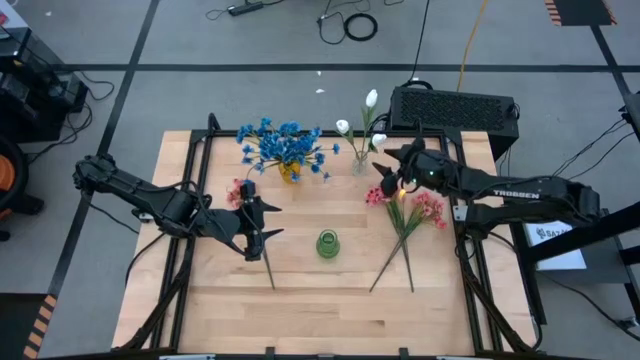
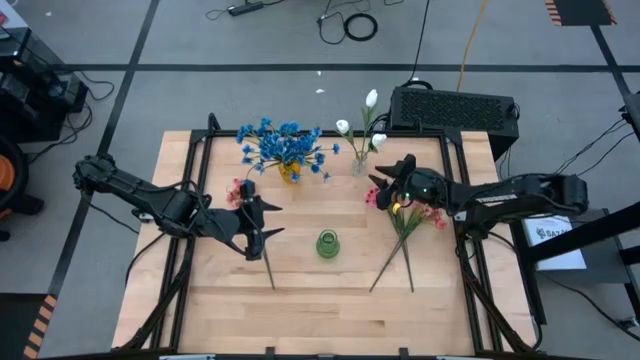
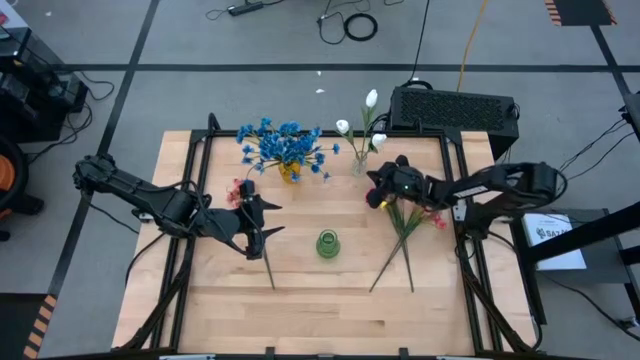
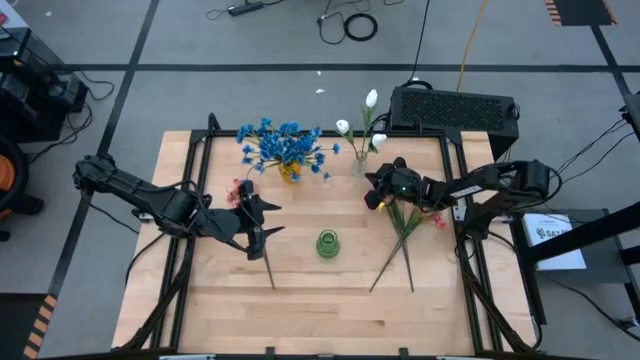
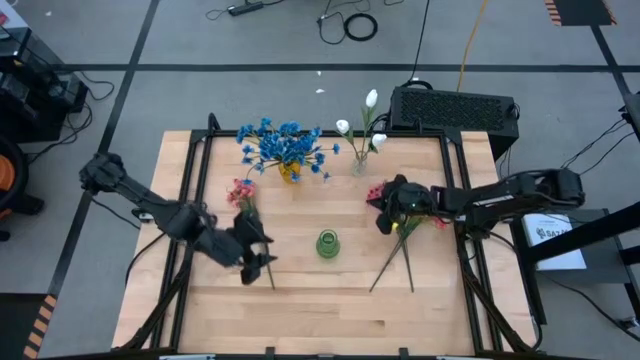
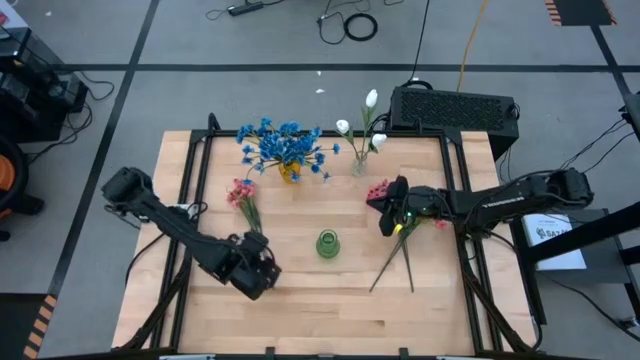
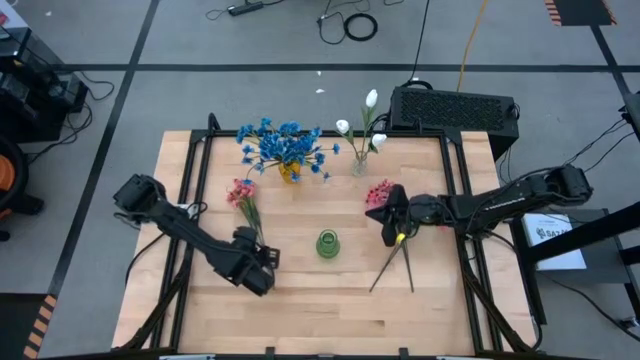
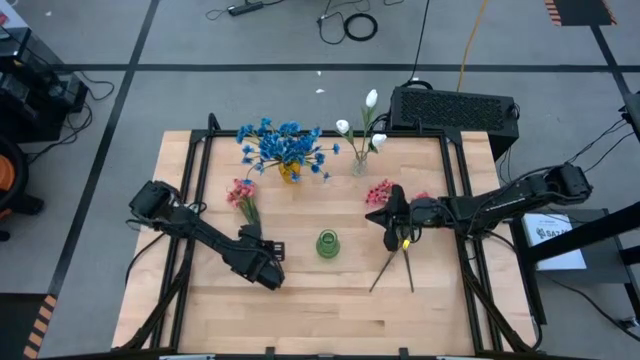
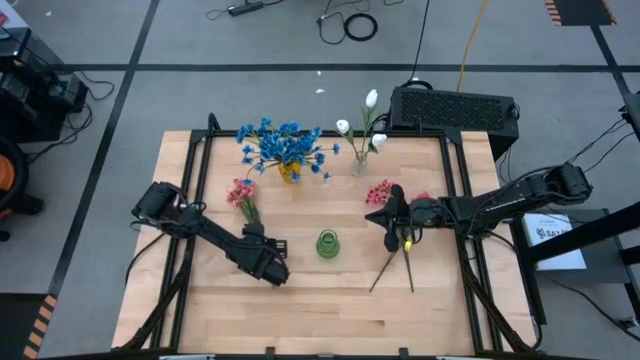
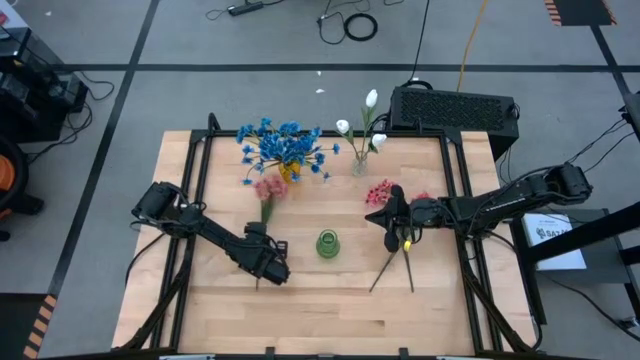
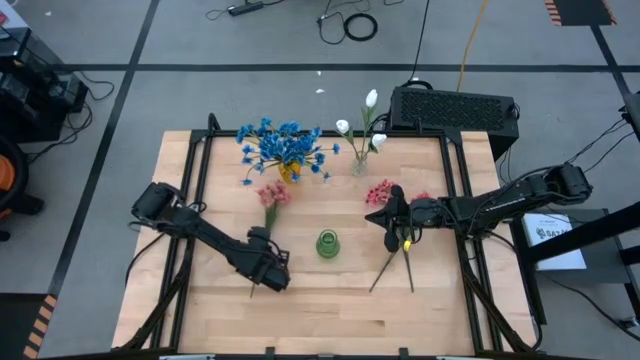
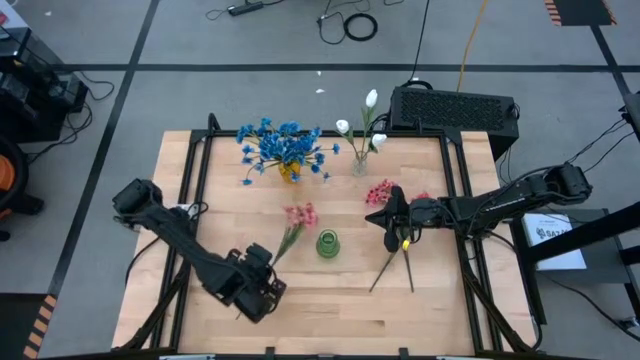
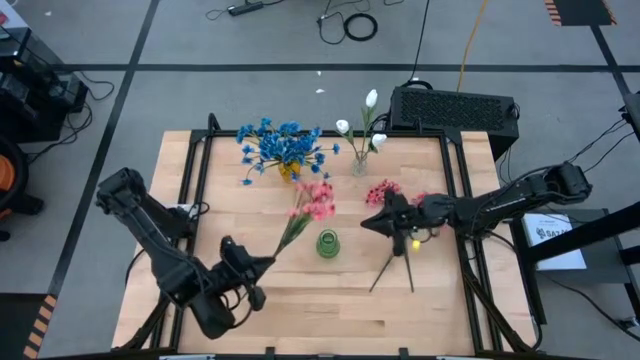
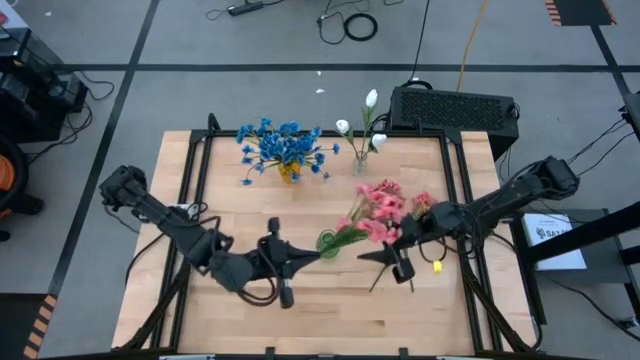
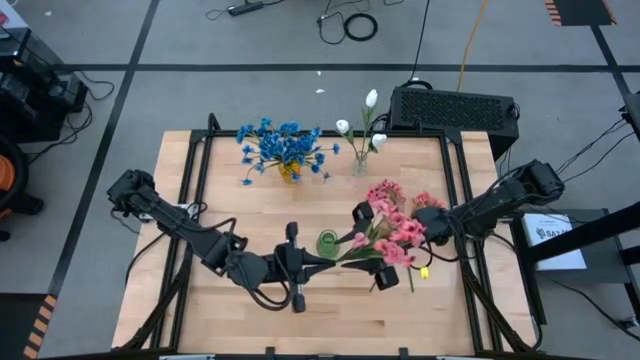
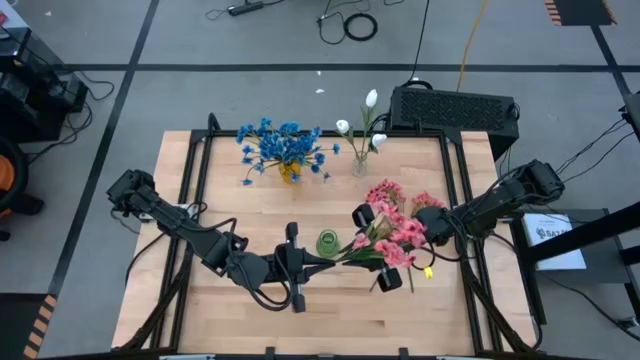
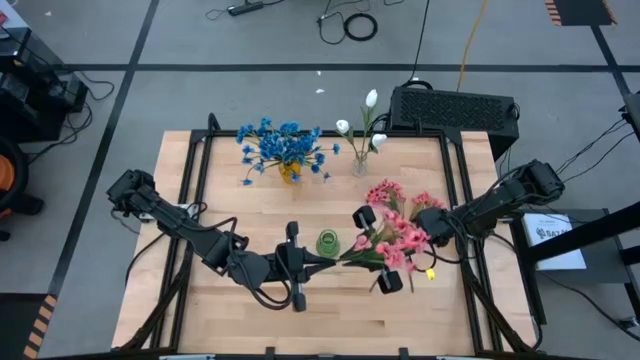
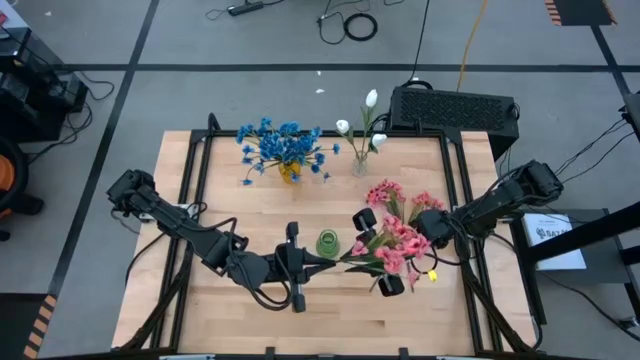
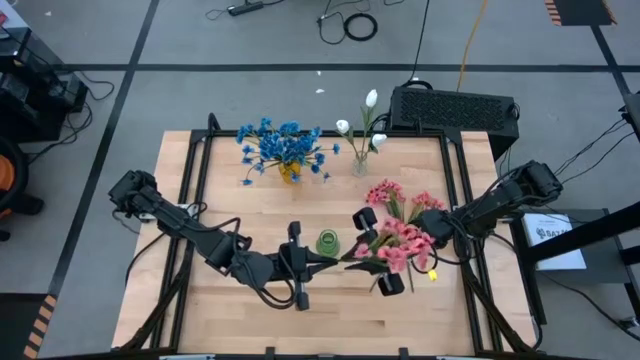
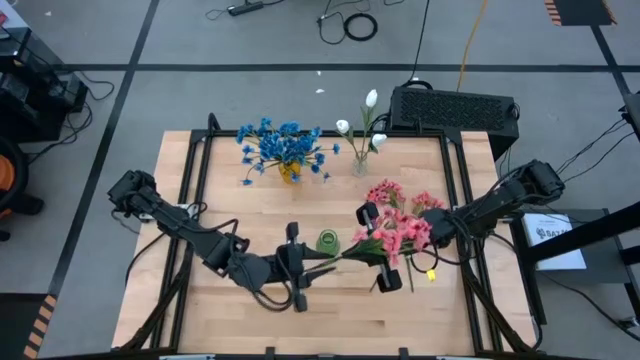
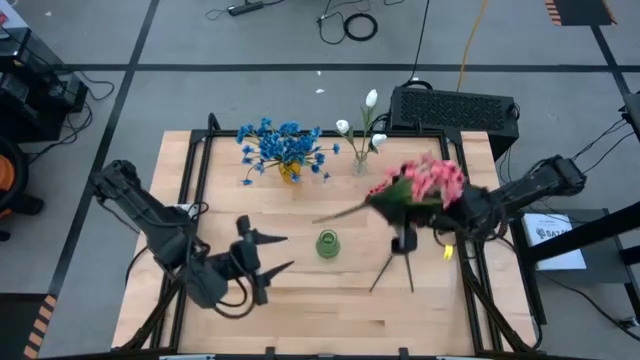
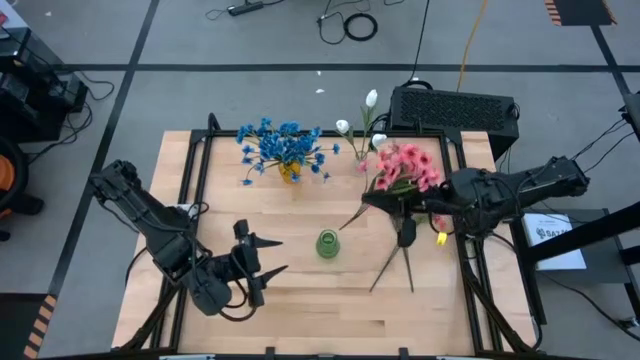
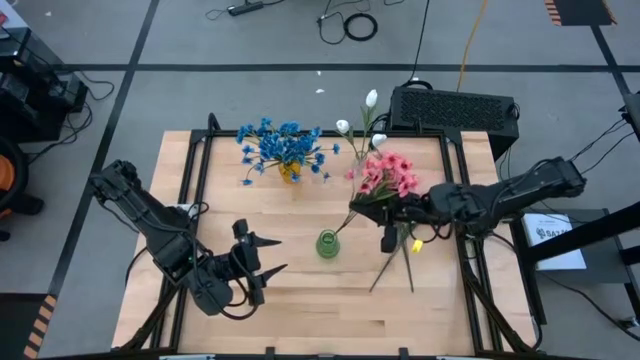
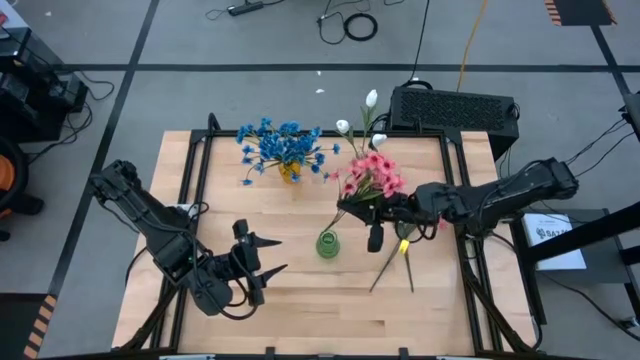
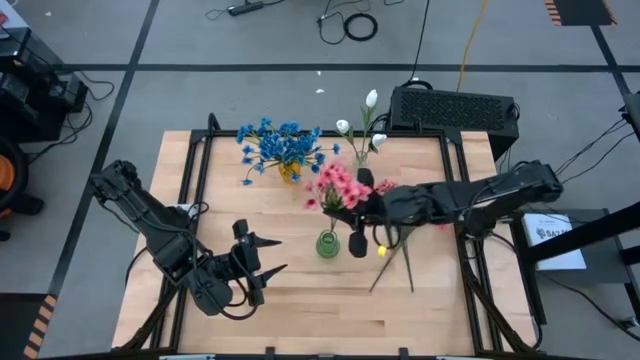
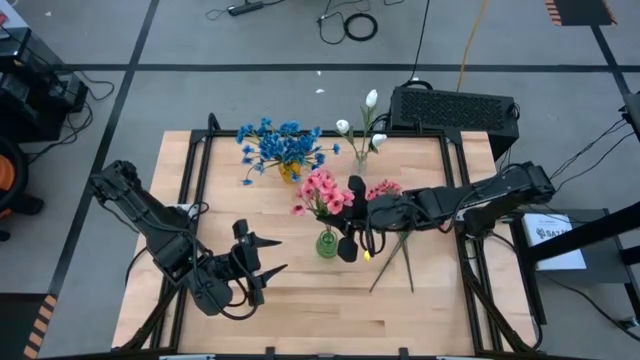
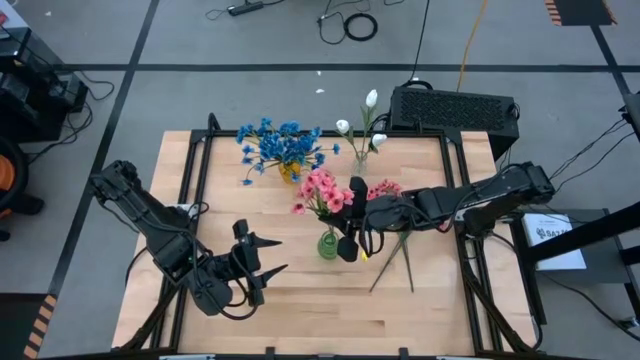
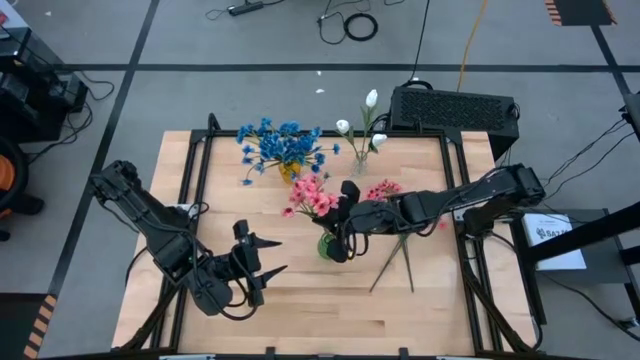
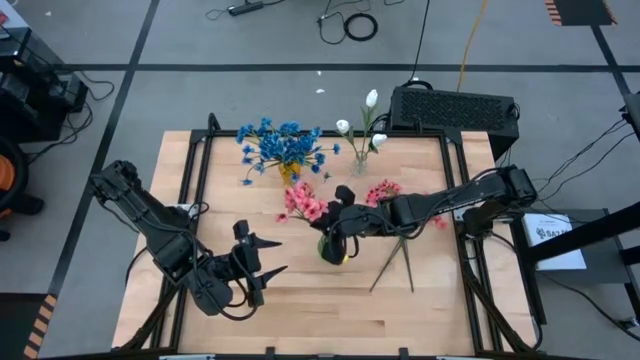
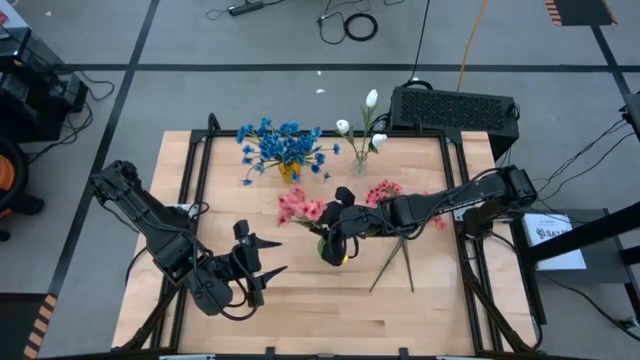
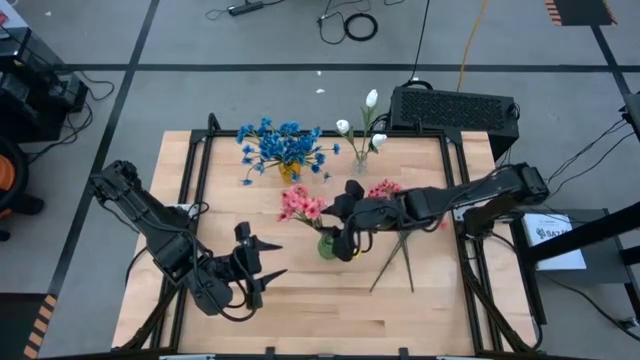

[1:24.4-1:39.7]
Task: Sort flowers into vase by color
Put the left pink flowers into the green vase

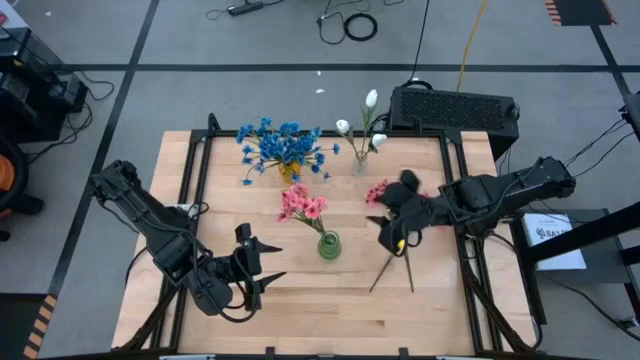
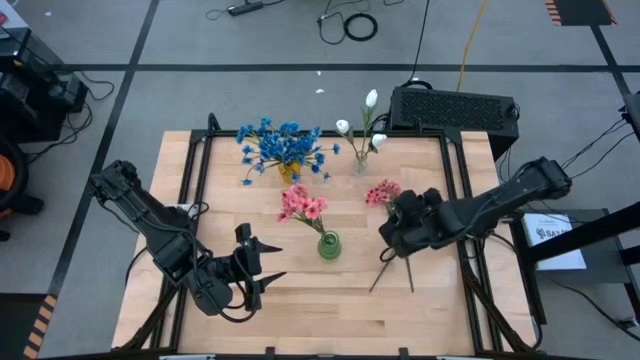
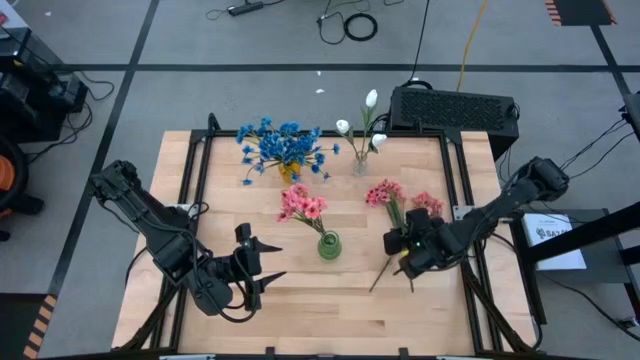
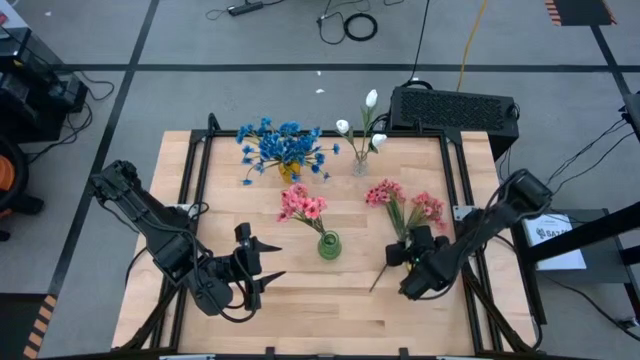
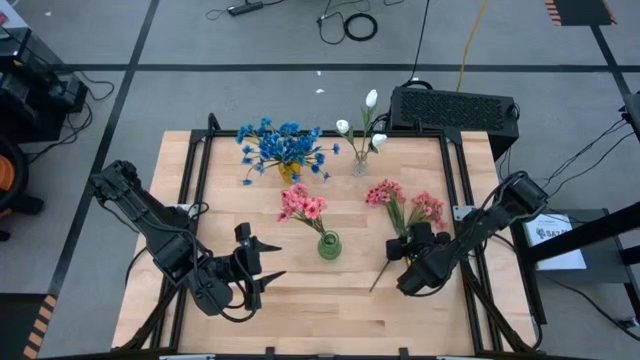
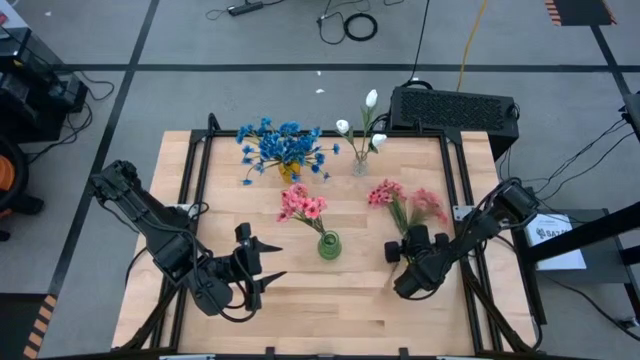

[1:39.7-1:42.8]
Put the right pink flowers into the green vase

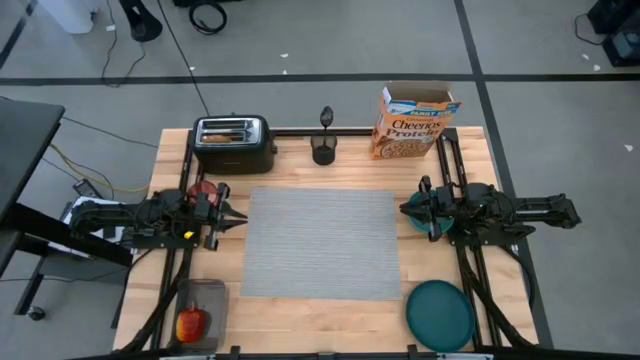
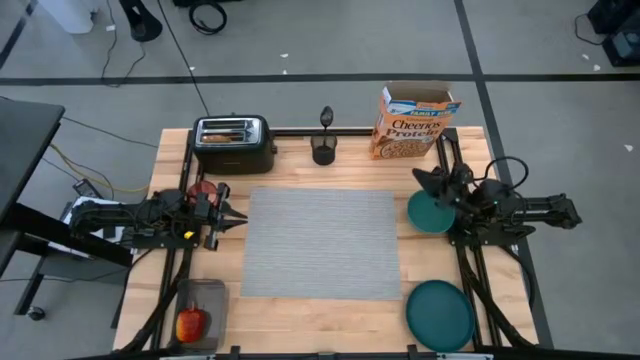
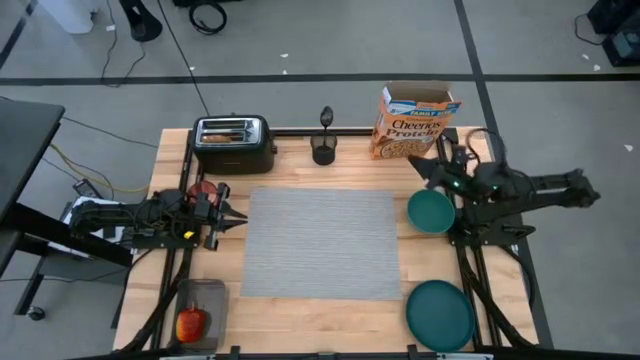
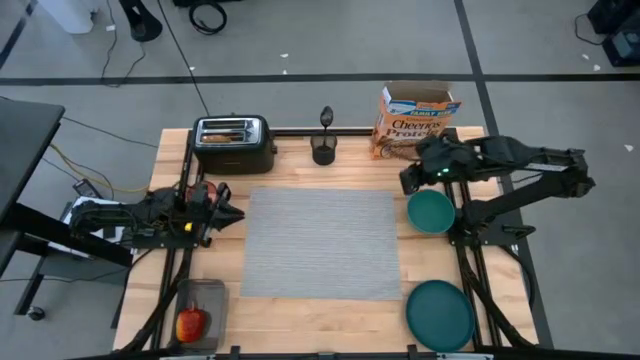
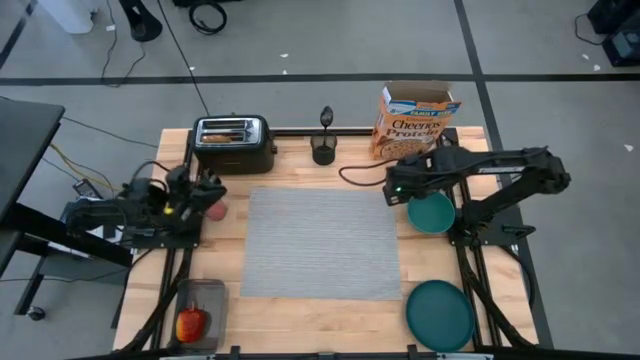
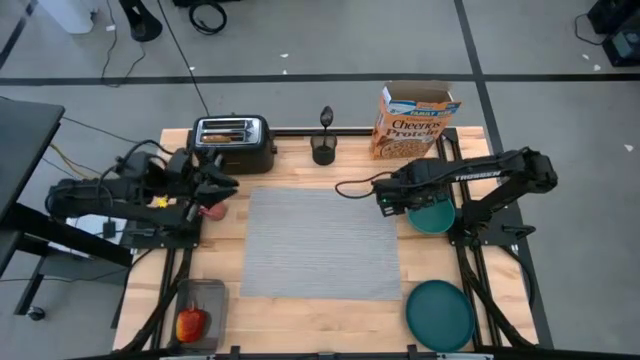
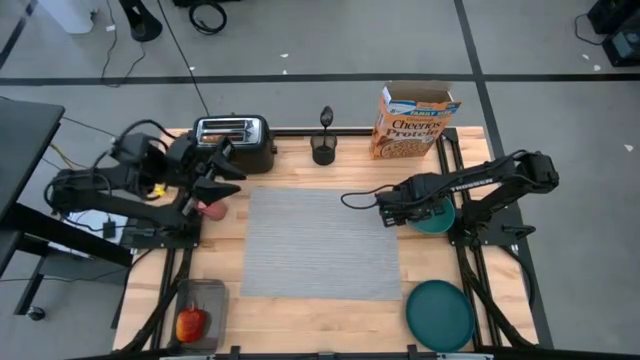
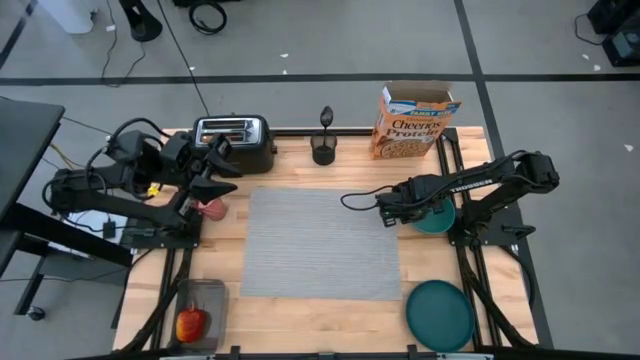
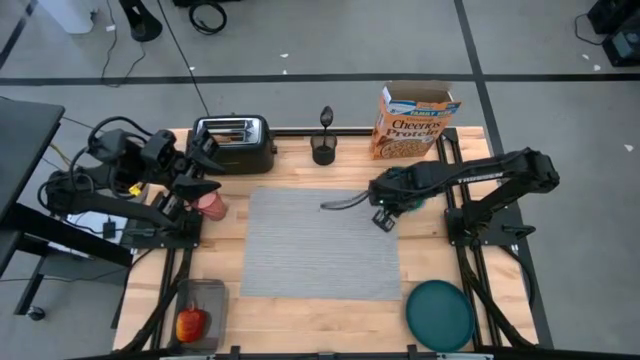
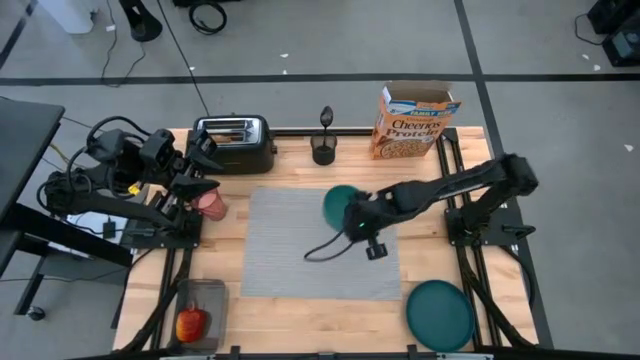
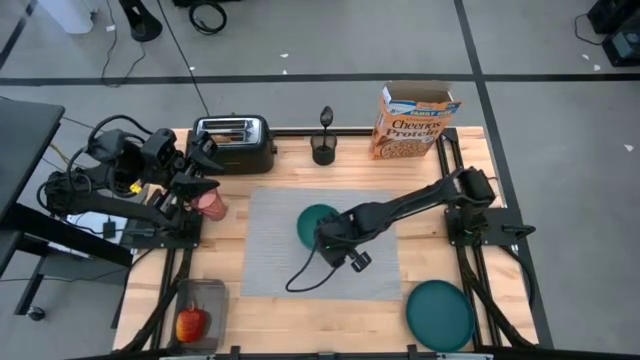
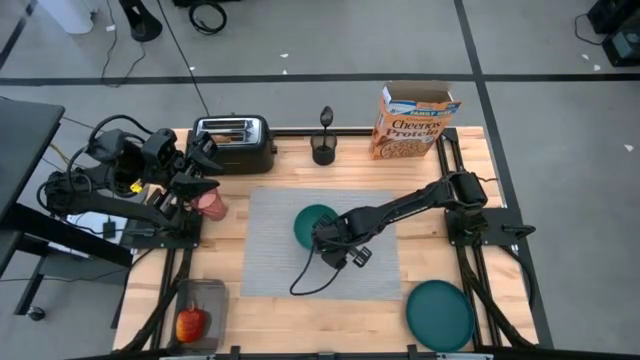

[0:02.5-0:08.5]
Task: Arrange a breakfast setting
Put the dark green bowl on the middle of the gray placemat
